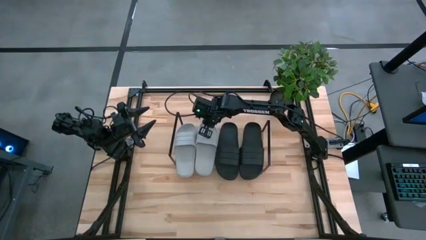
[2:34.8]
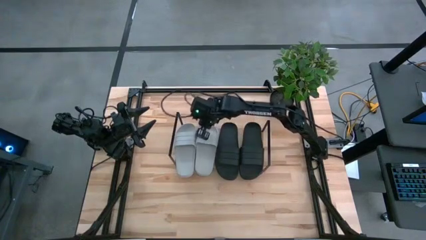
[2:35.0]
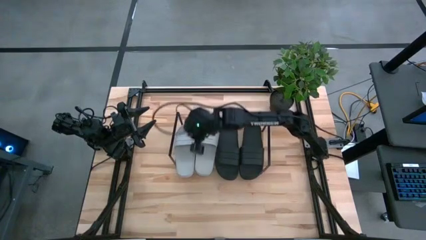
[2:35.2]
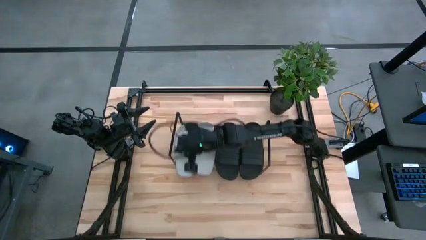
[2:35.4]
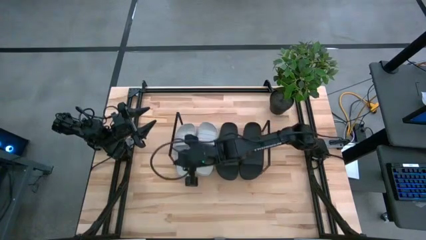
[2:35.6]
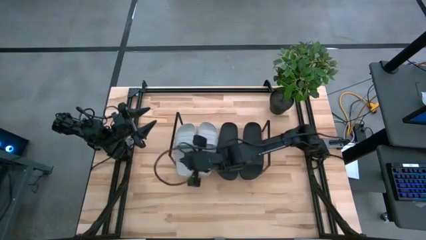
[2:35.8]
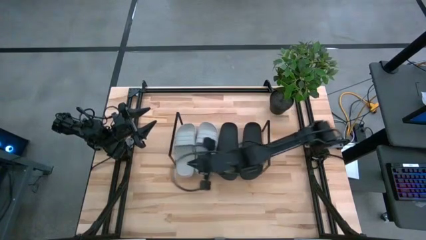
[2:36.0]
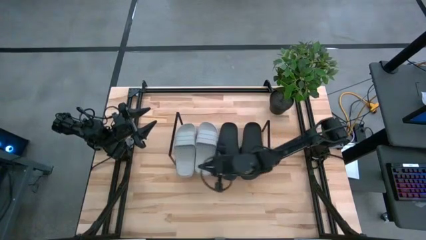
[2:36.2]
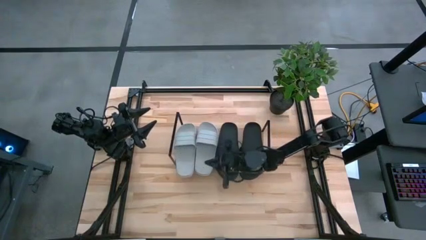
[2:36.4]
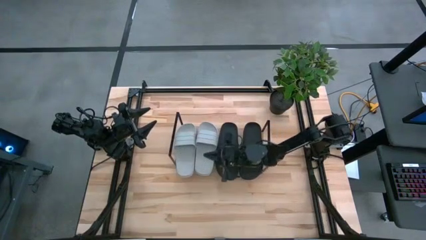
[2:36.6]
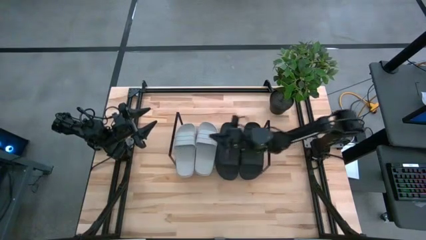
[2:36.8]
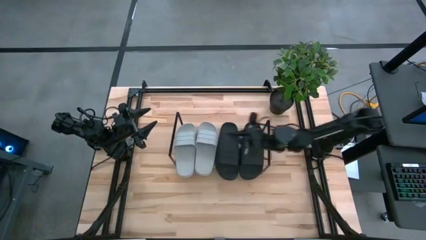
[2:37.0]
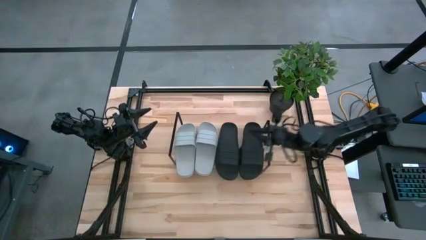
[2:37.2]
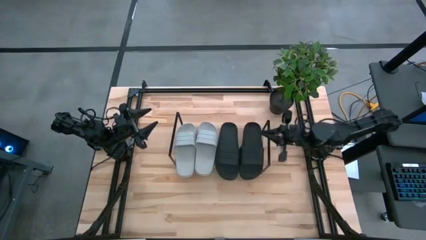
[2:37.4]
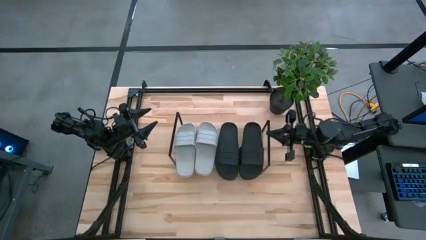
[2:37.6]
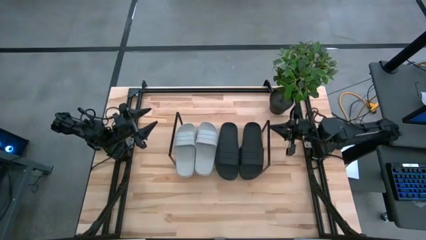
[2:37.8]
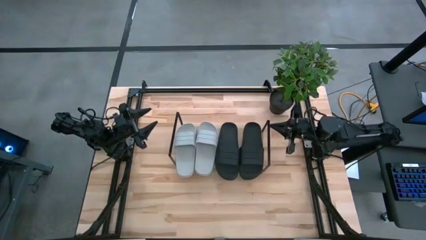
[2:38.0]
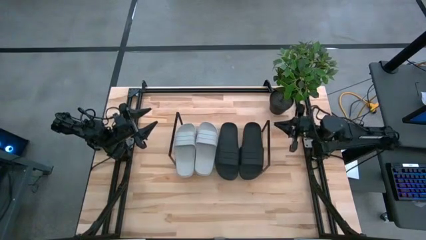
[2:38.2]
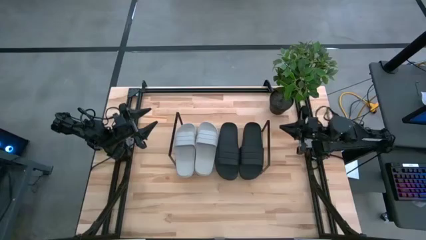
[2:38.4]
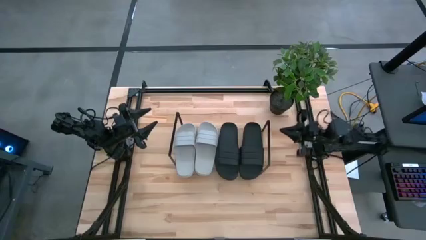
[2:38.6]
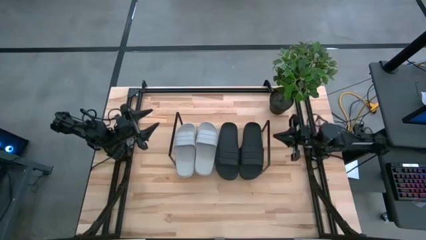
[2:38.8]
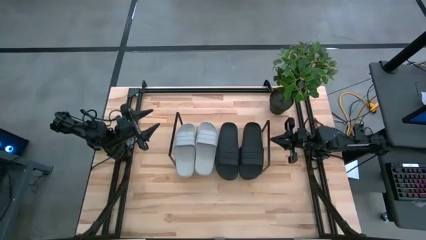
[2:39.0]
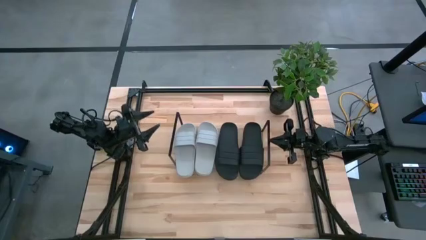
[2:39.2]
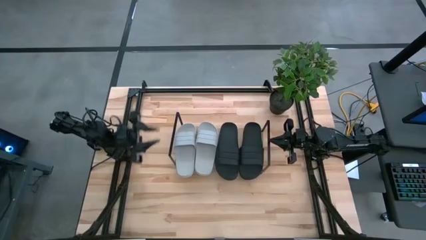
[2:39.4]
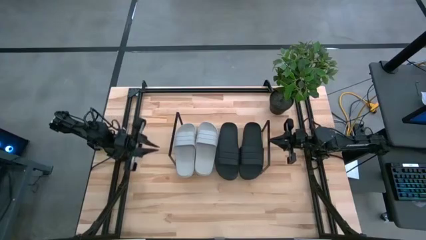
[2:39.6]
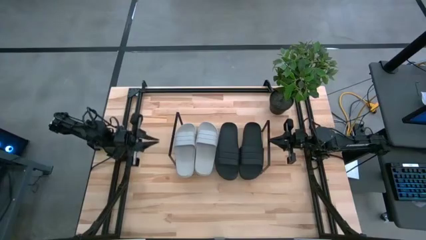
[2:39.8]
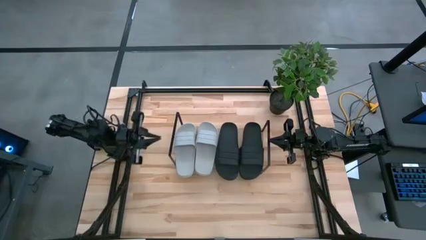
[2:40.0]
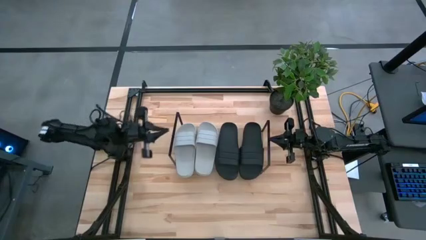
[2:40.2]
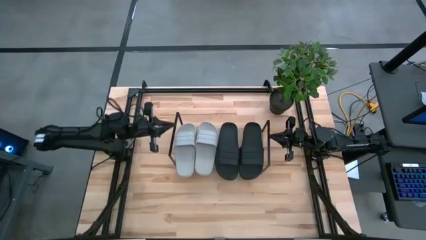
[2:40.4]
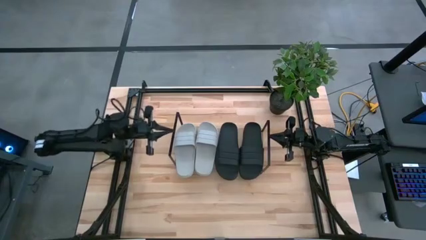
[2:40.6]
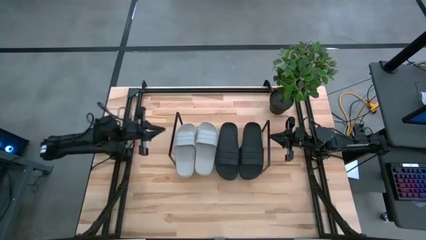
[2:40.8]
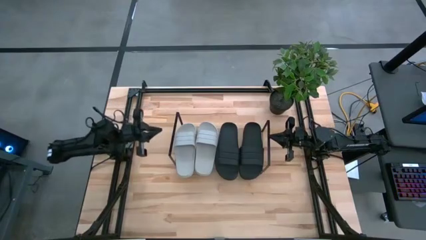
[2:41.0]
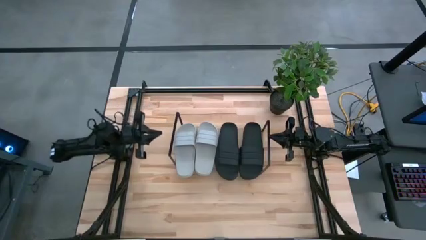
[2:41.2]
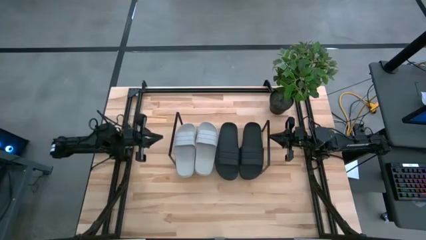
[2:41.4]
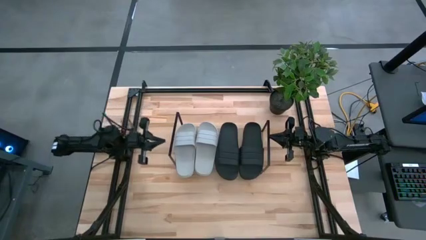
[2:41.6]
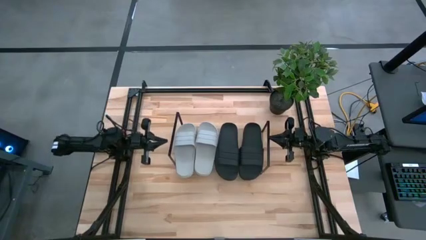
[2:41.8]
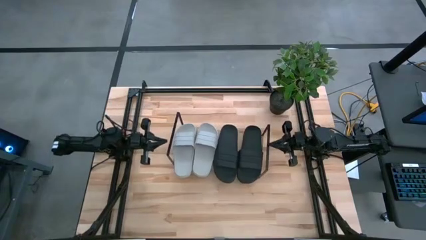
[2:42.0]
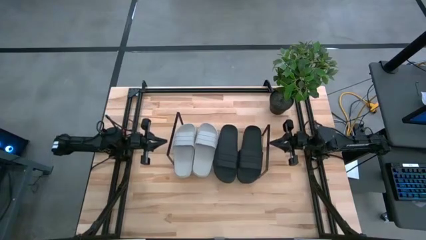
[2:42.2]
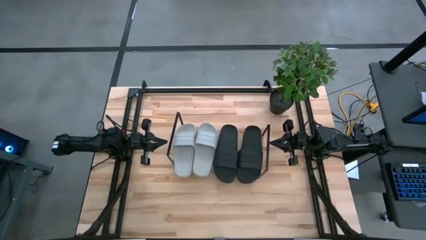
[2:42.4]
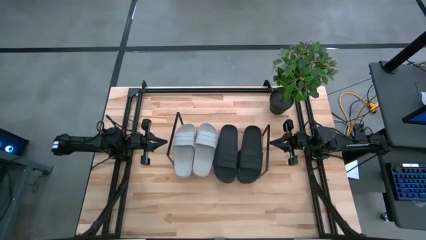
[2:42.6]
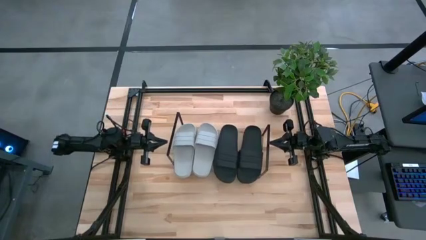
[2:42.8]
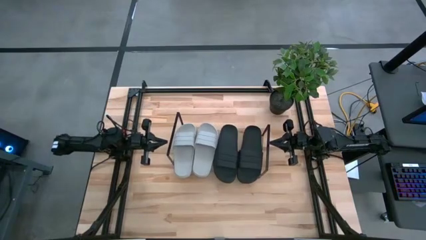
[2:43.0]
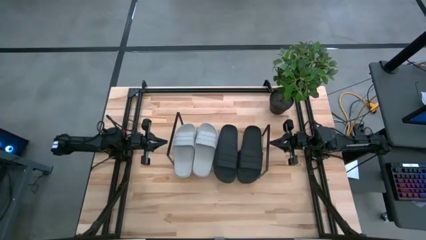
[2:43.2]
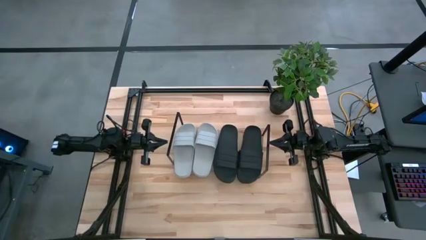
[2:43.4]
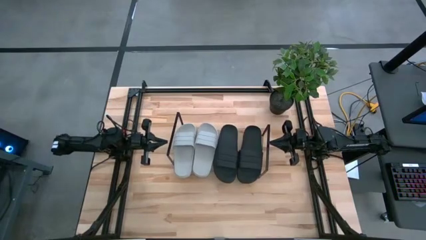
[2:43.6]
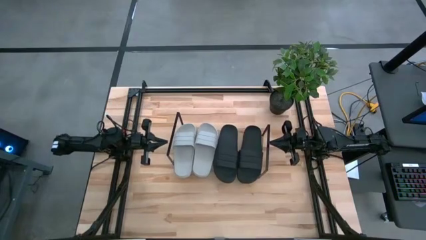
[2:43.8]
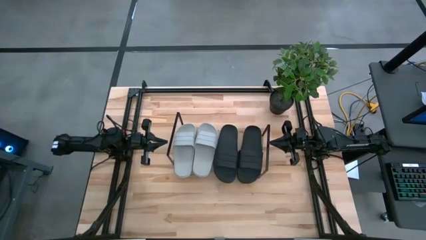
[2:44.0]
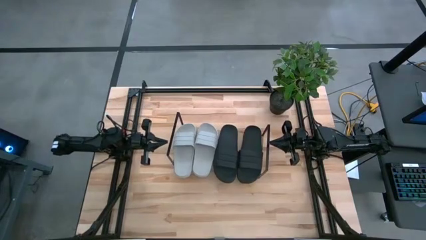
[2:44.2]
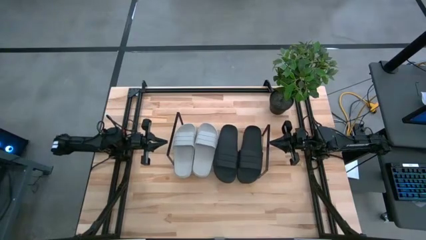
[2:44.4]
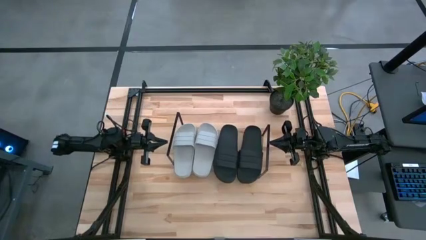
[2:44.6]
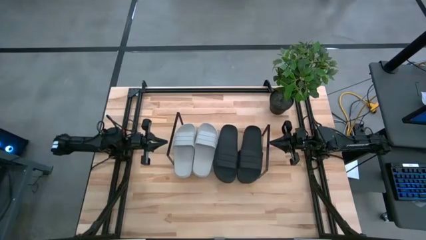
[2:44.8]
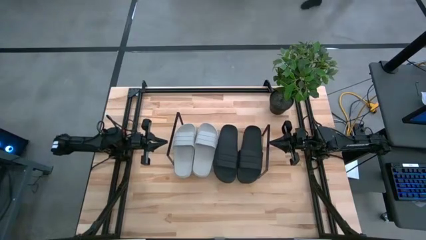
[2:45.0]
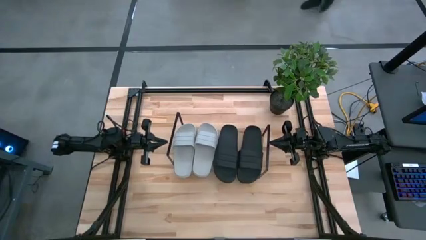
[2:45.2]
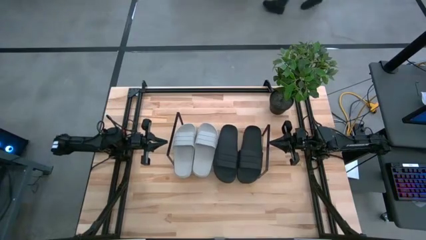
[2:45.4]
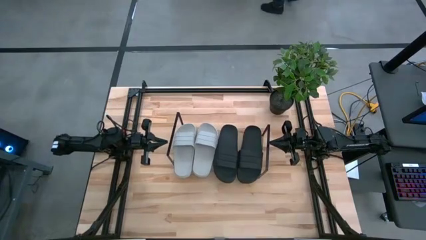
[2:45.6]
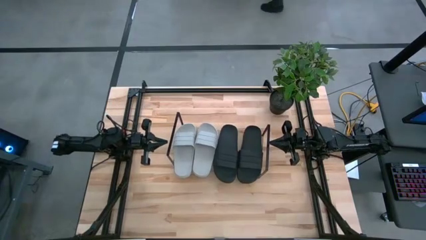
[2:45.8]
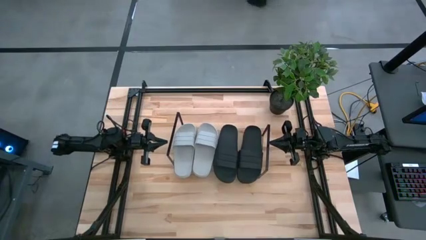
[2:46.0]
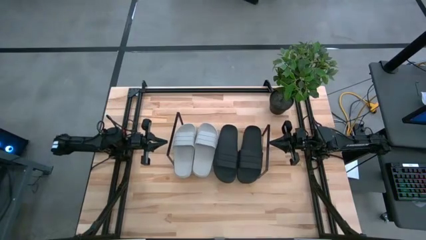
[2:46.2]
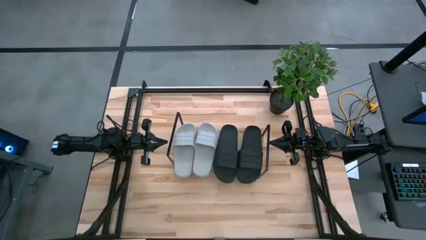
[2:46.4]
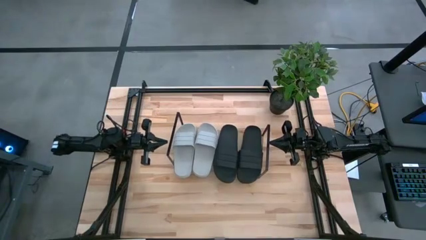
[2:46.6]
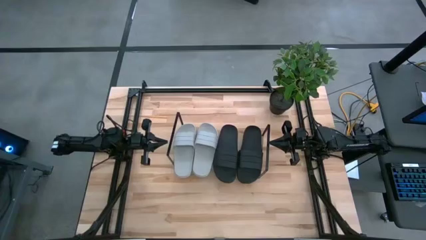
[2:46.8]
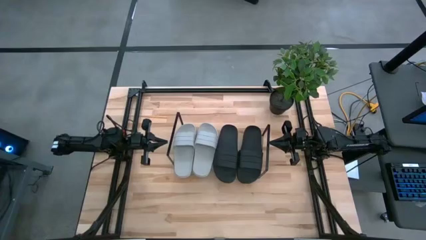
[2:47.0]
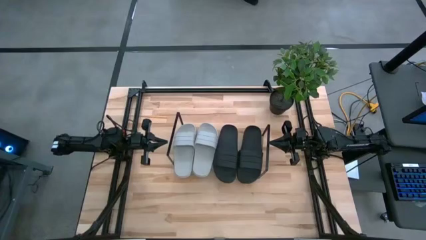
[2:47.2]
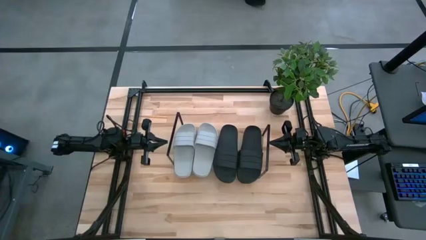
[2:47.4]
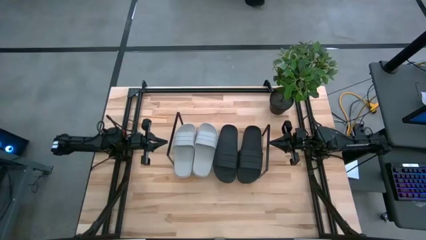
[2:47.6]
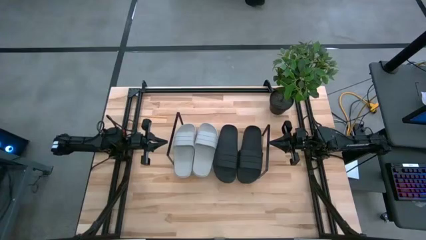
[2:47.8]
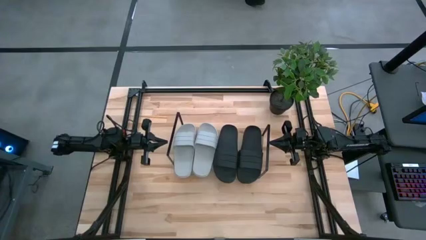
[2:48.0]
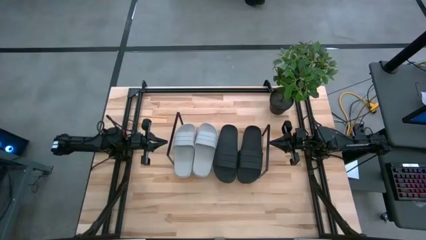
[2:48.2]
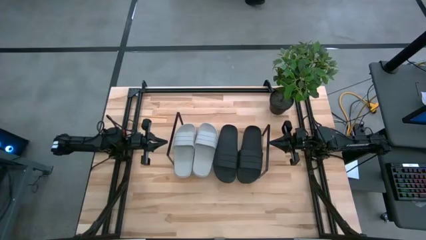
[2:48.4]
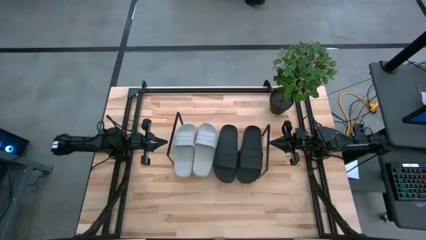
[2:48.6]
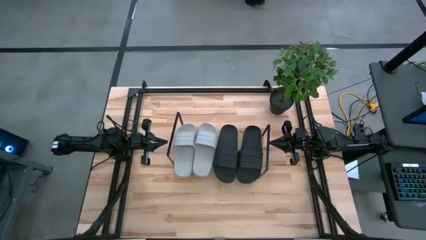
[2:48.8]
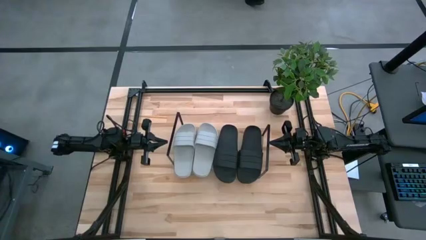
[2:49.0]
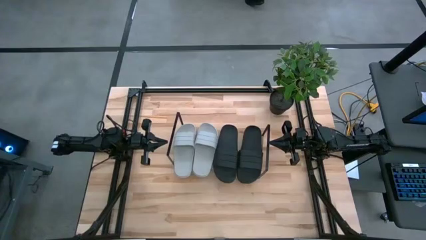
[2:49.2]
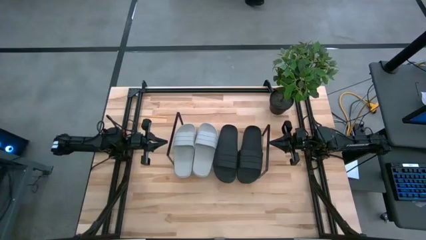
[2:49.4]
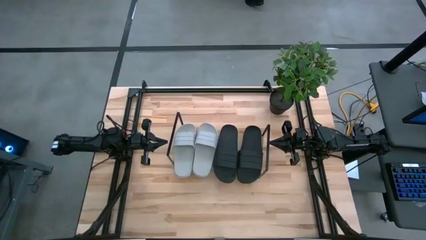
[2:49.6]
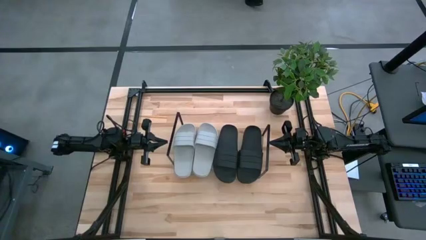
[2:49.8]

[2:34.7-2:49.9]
Task: Pick and place slides into the shelf
Return to Home Position
